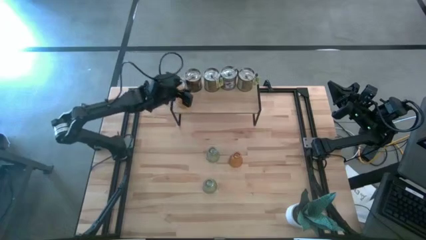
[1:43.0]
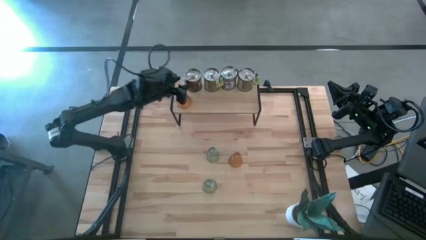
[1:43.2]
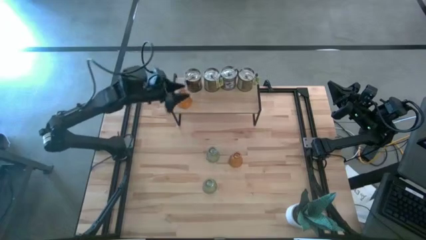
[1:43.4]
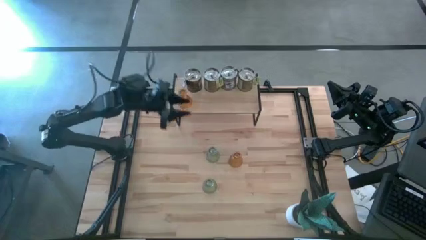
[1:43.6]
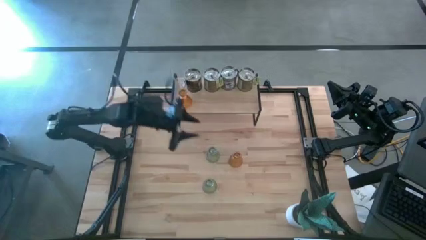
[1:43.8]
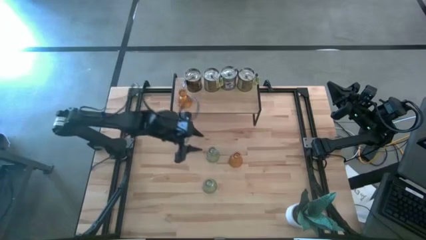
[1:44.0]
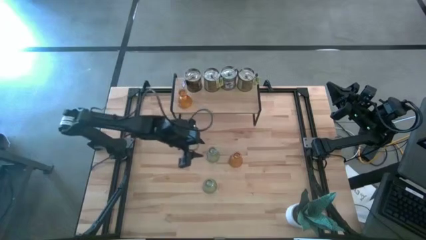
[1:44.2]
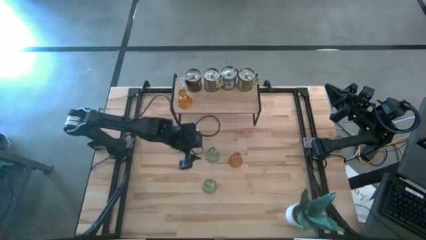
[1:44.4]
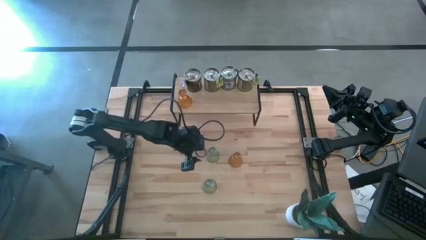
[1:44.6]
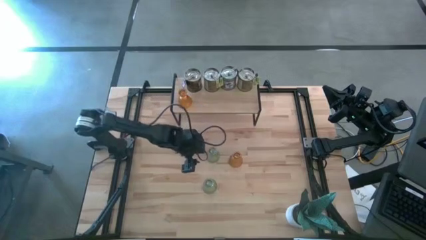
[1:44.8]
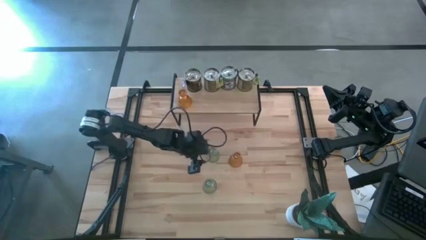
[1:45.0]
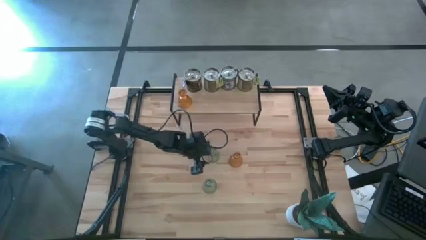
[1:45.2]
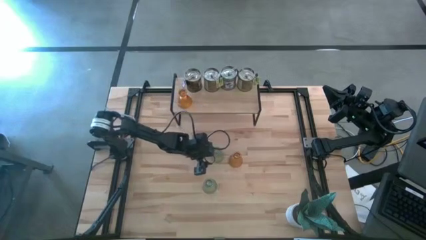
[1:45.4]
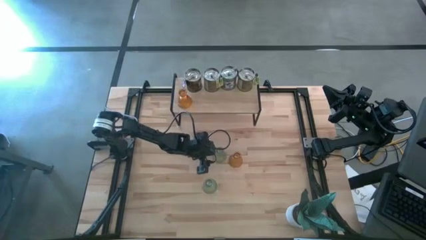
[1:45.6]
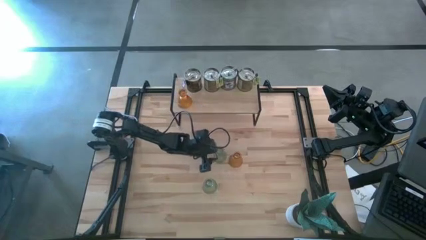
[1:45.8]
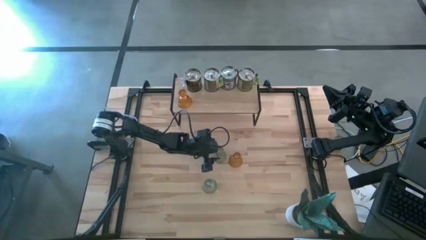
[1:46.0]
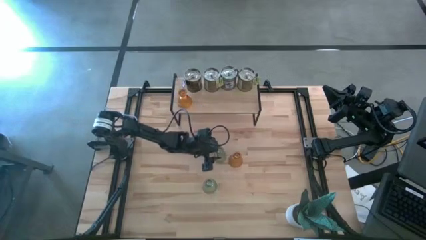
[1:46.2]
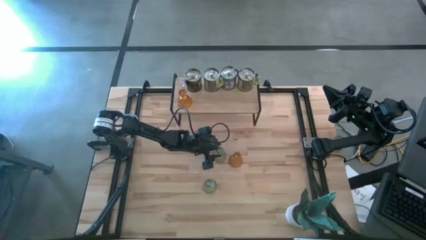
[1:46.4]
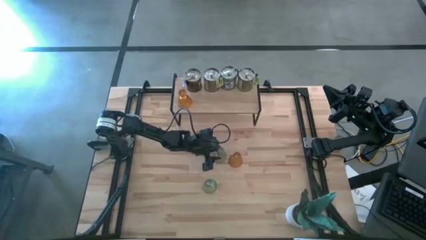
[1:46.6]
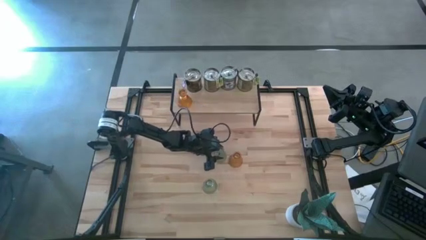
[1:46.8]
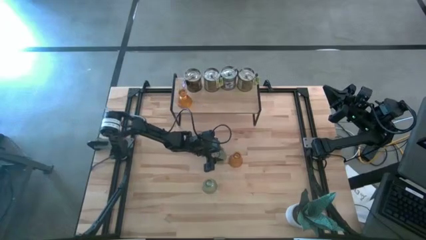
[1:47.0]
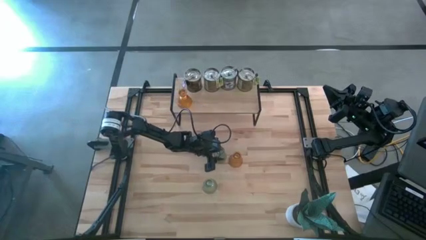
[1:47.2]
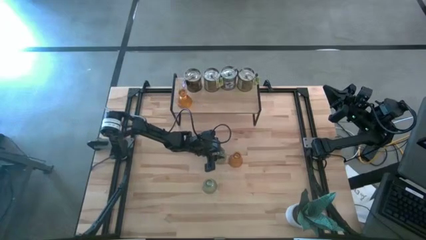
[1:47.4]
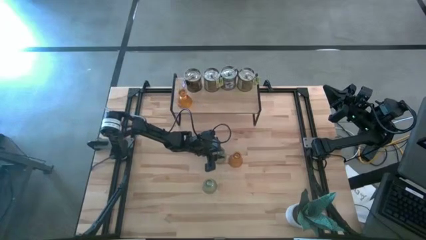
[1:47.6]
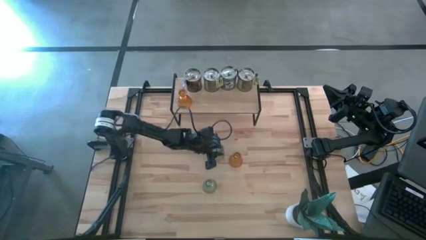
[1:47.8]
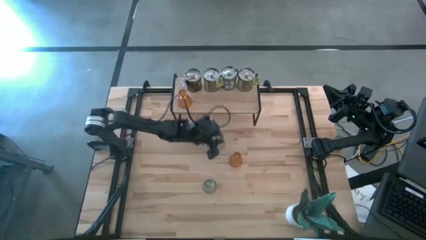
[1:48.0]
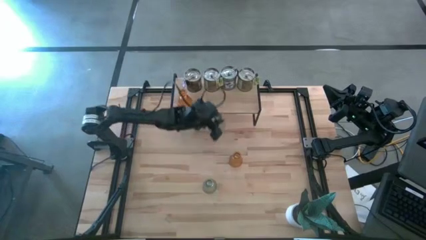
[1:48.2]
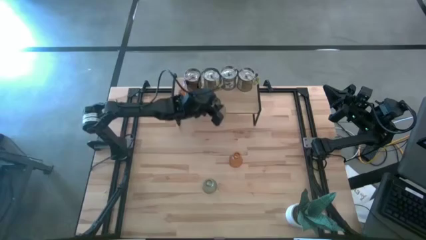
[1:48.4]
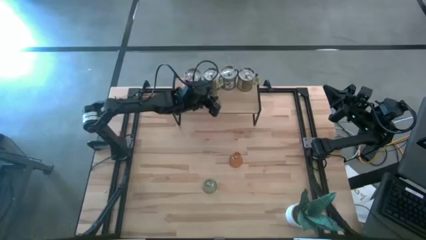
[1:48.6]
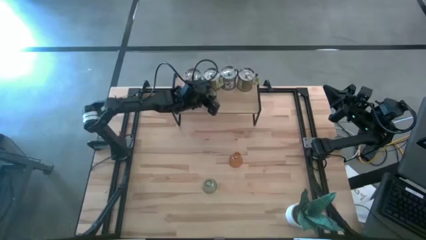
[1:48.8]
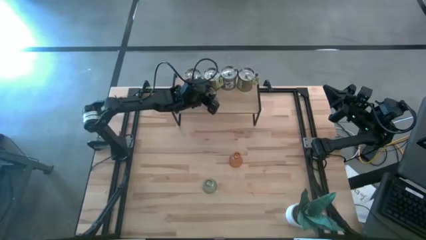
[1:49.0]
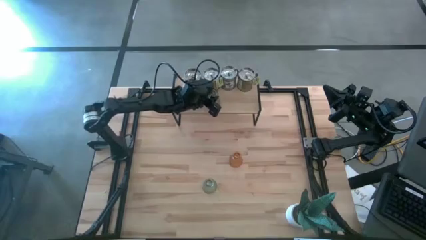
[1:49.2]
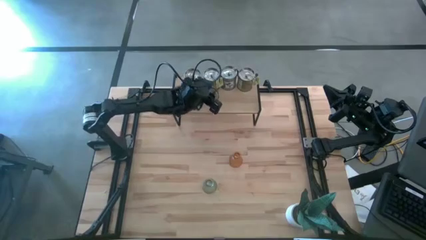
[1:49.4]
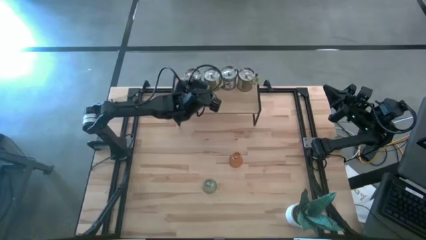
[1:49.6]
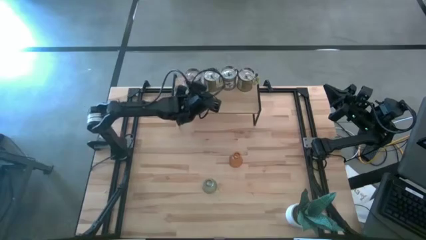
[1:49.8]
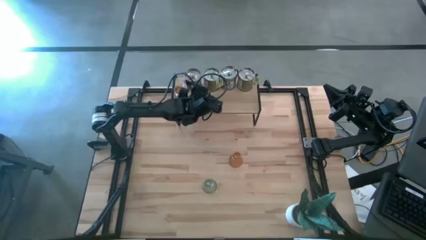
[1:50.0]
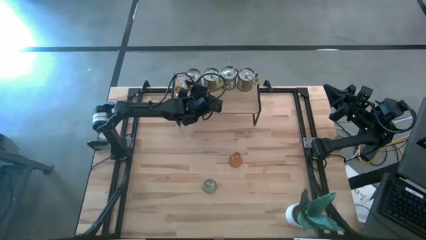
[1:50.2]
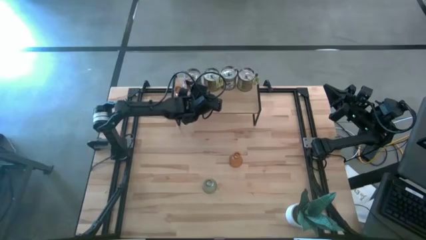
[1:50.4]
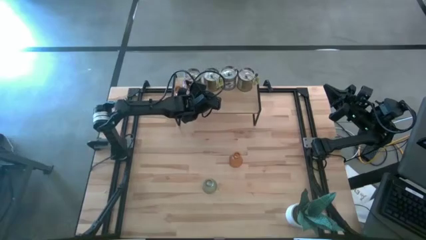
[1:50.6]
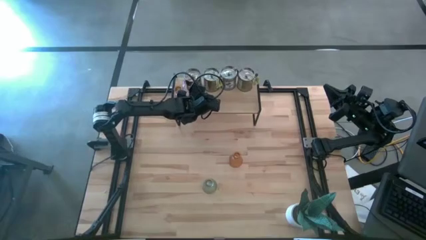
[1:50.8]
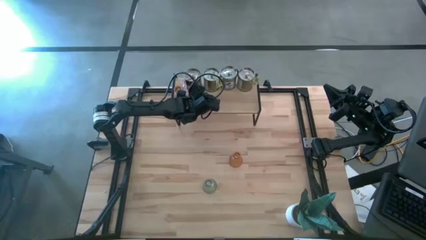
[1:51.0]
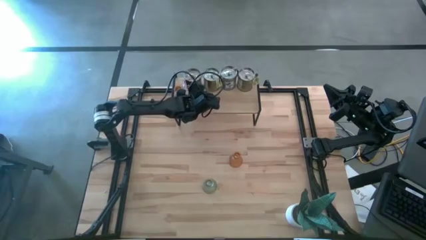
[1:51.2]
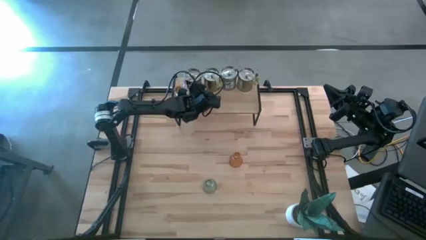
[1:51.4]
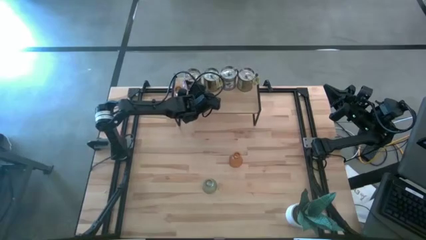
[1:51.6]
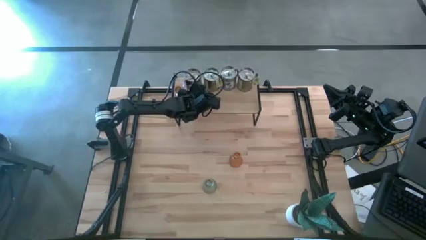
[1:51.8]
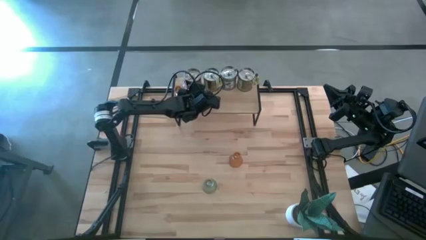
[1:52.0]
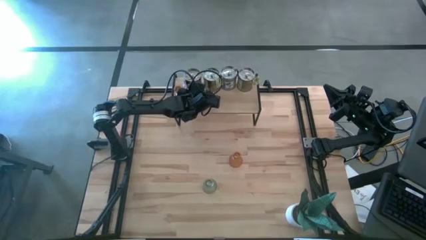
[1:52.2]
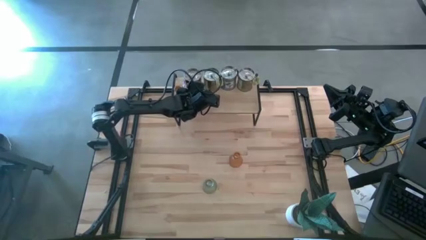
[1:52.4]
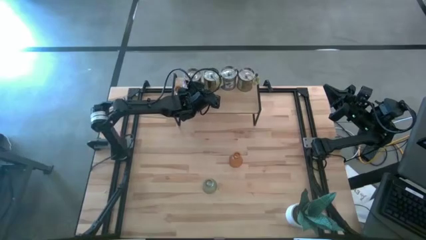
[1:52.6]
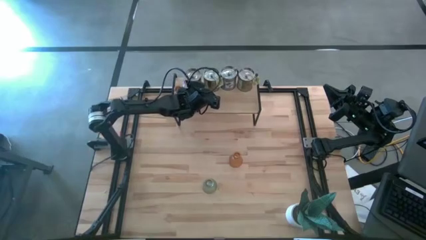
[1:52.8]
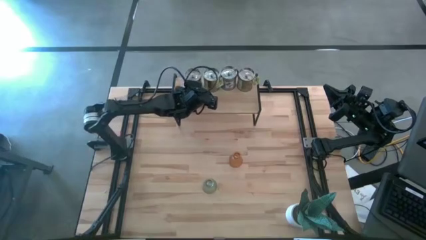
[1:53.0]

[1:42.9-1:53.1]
Task: Pick & Place candle stick holders
Put the green glass candle holder on the shelf

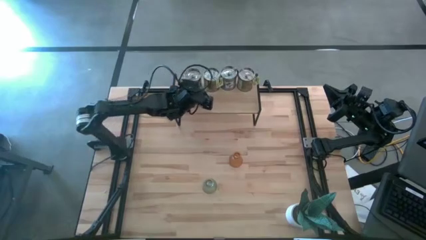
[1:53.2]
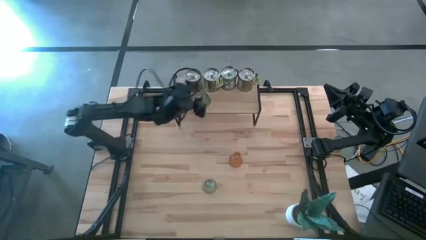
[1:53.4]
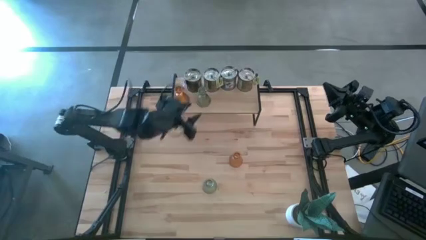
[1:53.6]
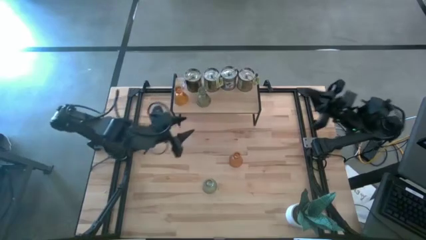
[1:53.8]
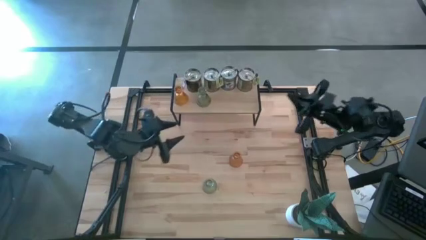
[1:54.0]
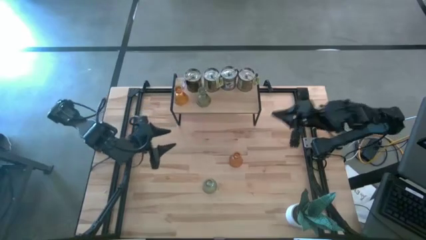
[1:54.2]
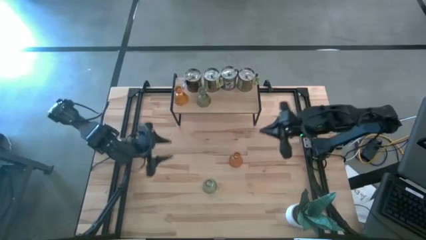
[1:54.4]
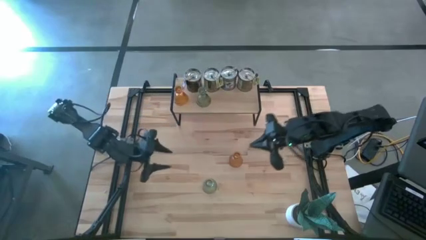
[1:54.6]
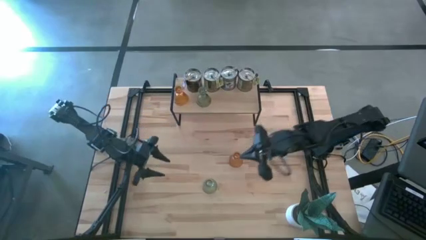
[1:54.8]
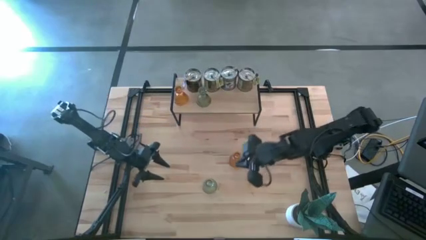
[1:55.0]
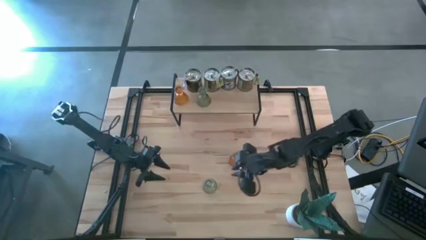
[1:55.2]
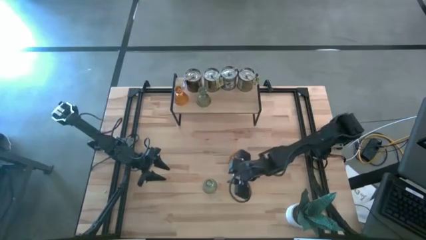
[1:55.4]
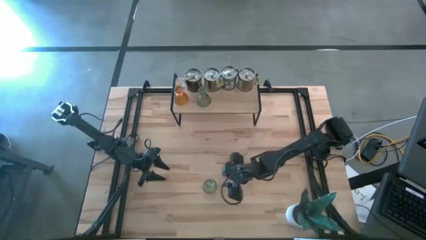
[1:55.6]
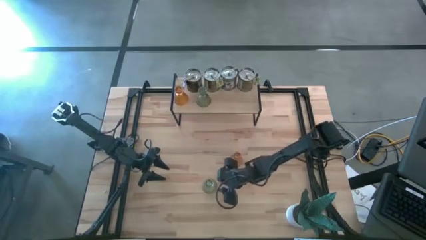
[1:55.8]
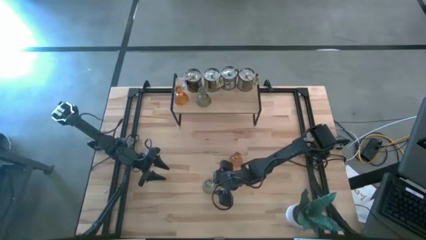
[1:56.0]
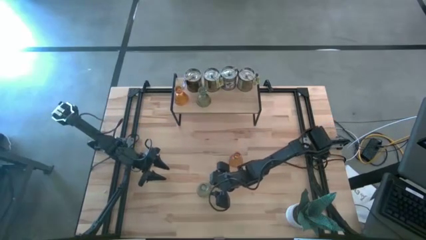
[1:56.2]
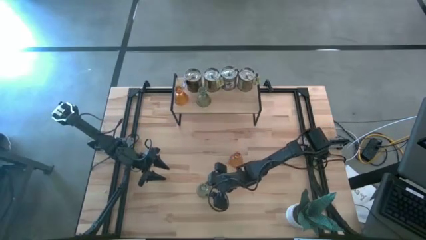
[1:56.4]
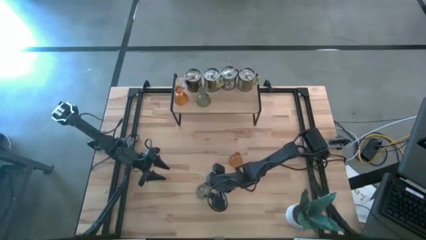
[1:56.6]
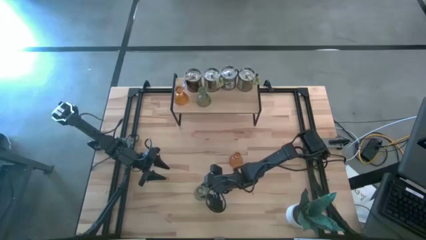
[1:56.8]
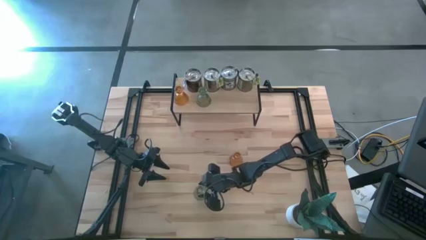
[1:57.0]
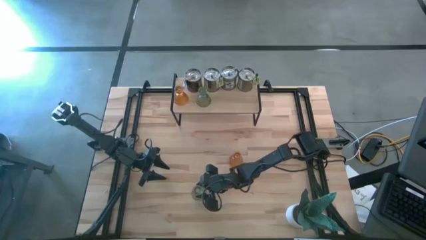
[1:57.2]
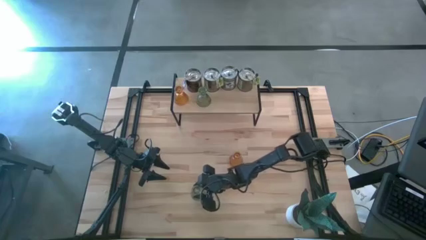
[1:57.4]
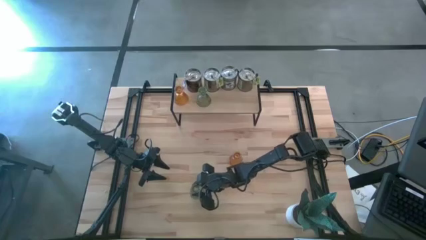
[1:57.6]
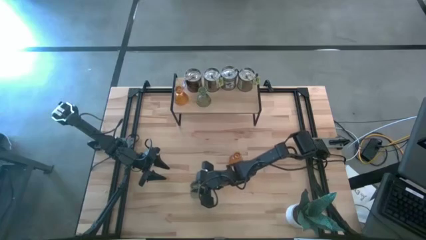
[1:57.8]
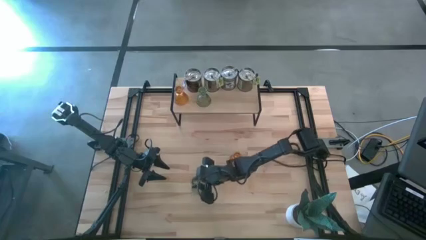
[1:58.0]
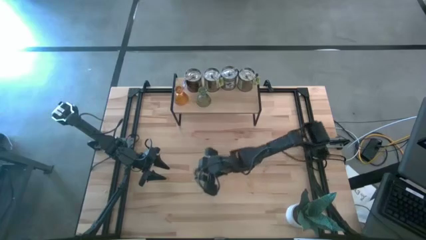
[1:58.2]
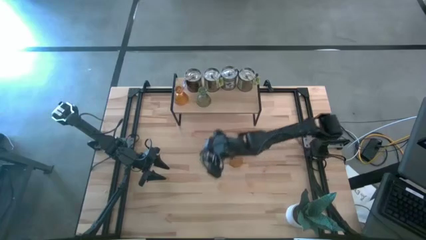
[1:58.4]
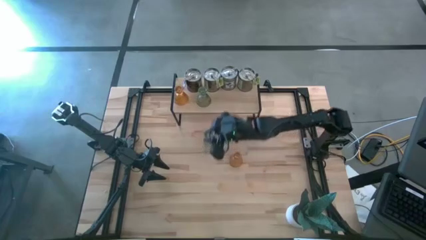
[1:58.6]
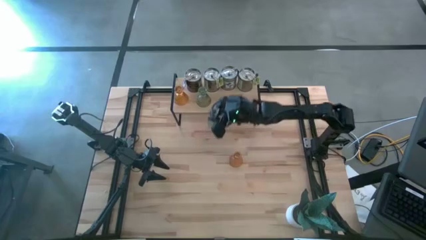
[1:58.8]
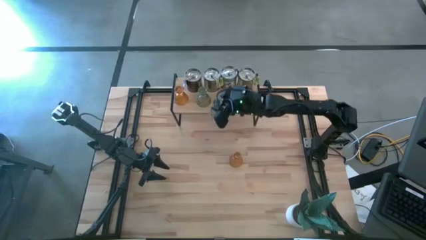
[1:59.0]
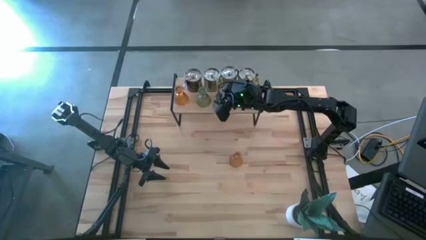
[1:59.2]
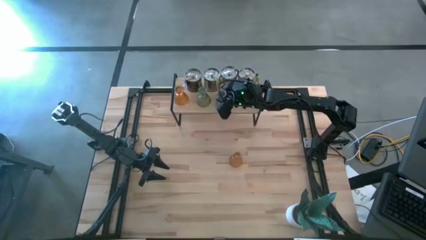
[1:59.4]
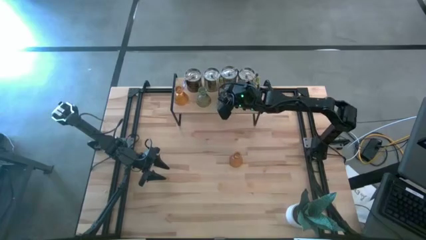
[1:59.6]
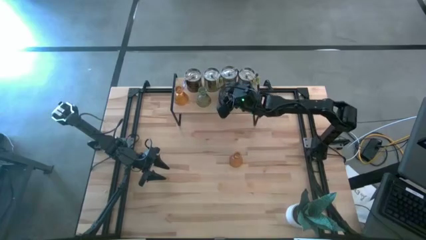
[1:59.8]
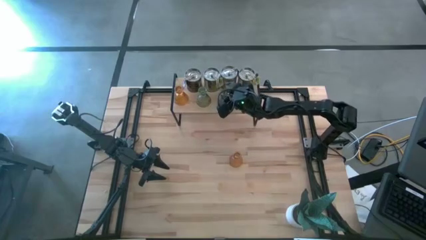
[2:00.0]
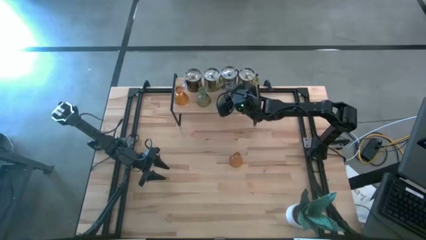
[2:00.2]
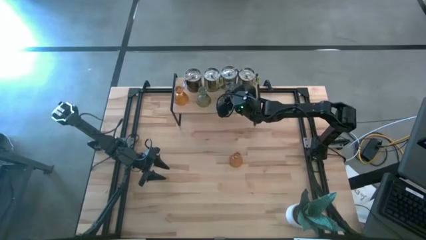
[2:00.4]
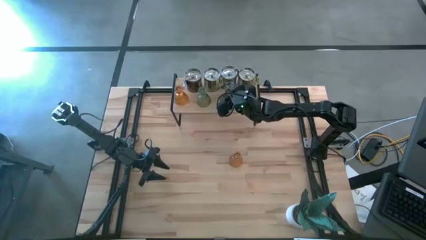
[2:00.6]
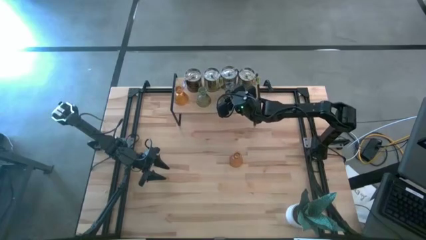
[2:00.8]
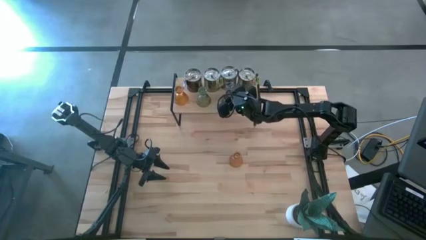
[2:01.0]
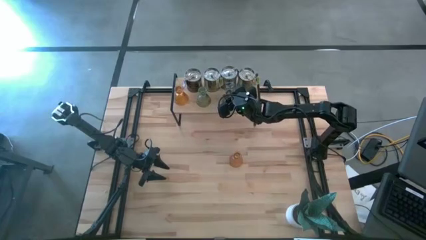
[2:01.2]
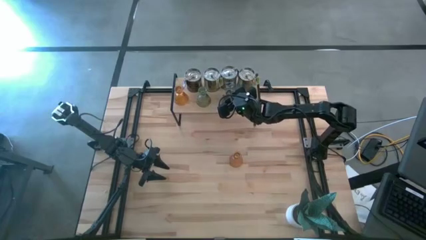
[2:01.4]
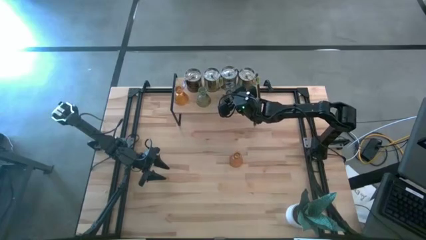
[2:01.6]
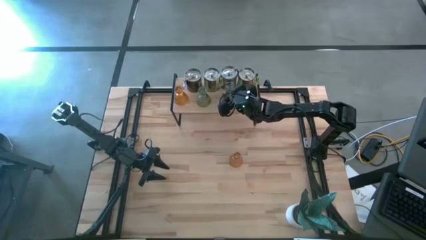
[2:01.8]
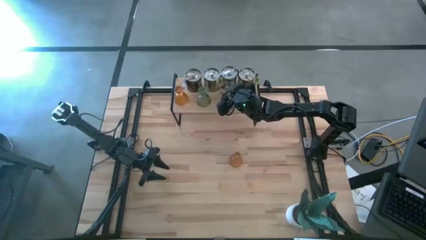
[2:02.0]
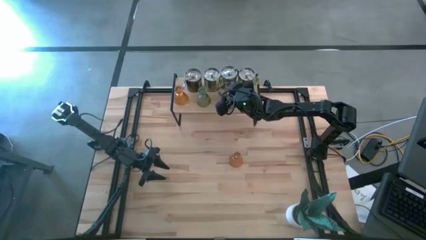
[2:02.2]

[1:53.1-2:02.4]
Put the green glass candle holder on the shelf
